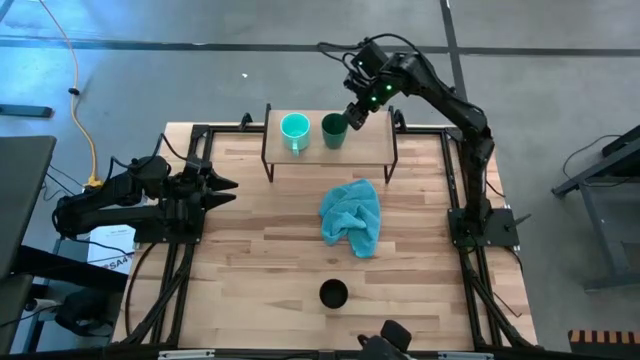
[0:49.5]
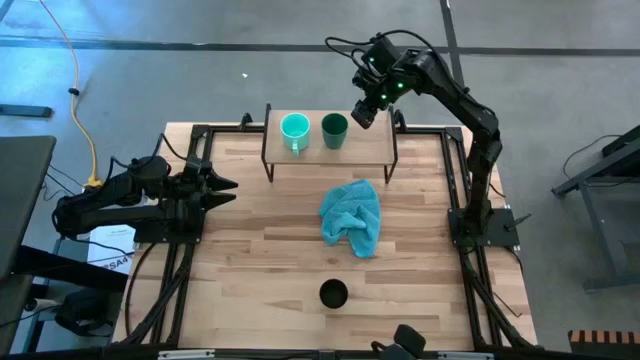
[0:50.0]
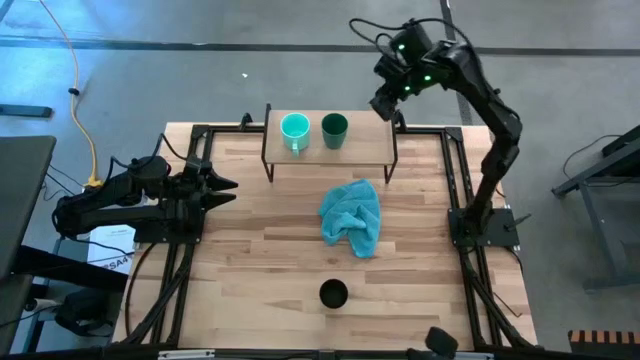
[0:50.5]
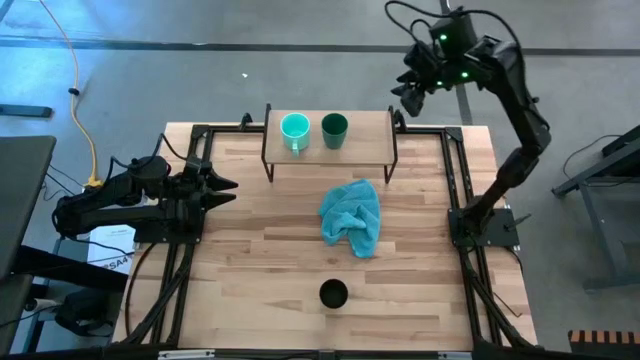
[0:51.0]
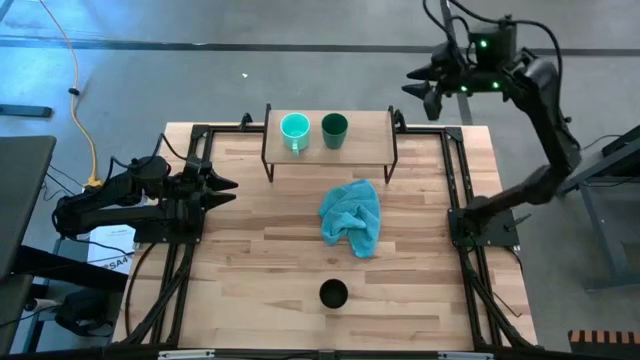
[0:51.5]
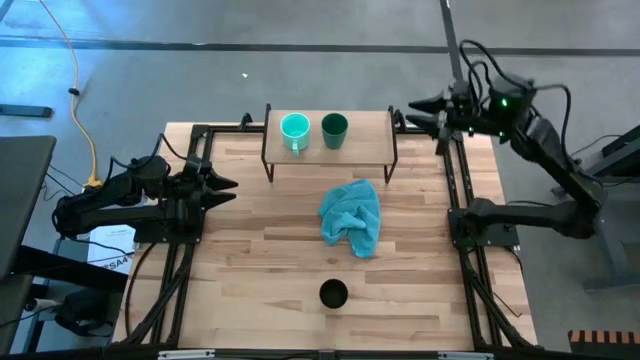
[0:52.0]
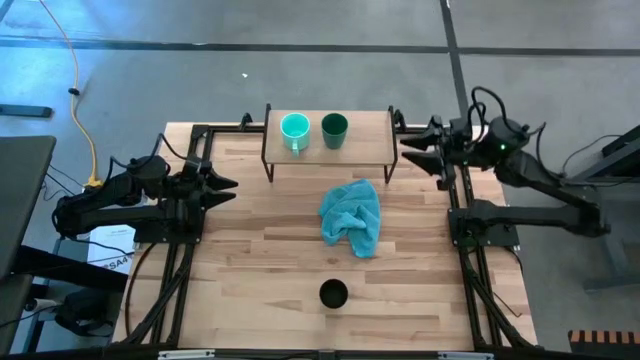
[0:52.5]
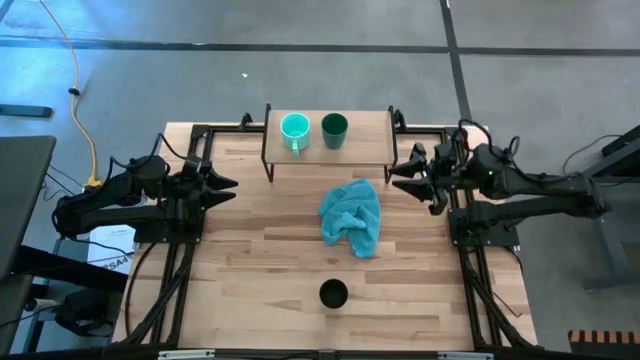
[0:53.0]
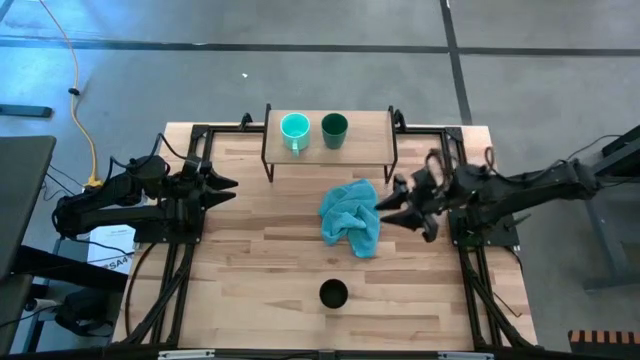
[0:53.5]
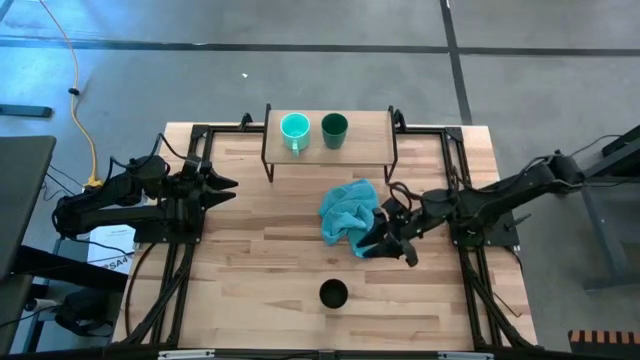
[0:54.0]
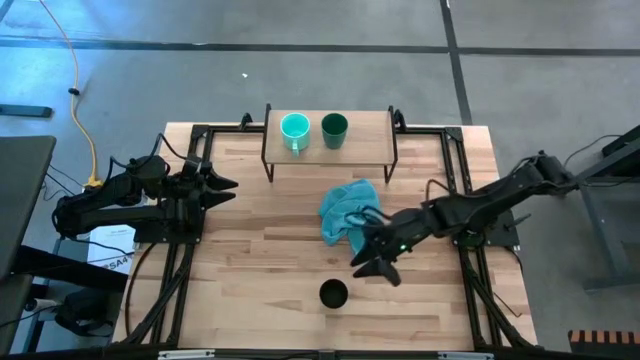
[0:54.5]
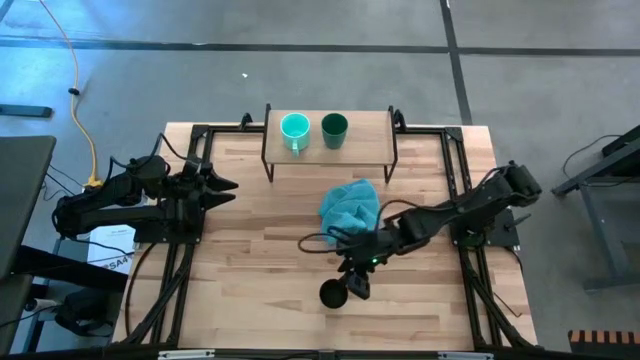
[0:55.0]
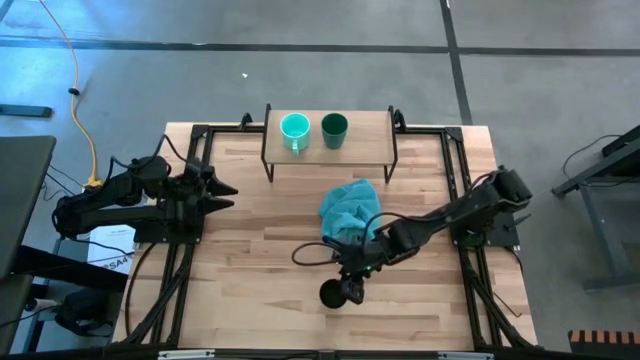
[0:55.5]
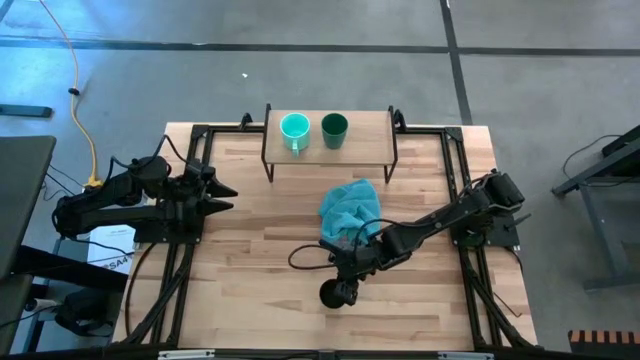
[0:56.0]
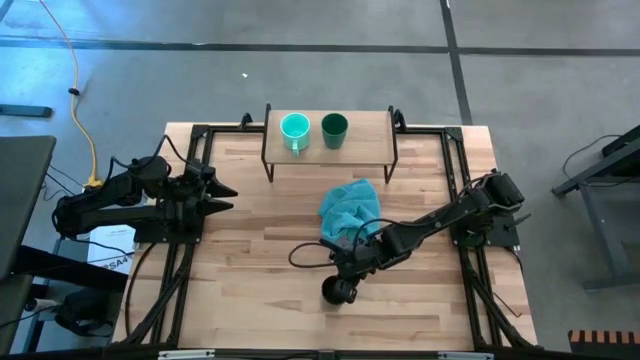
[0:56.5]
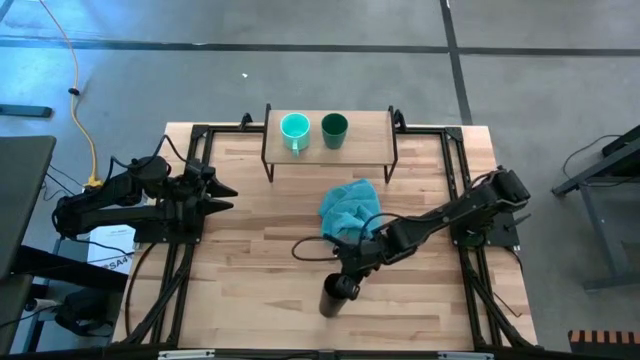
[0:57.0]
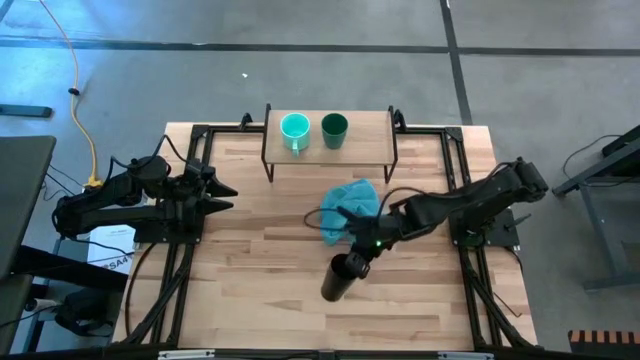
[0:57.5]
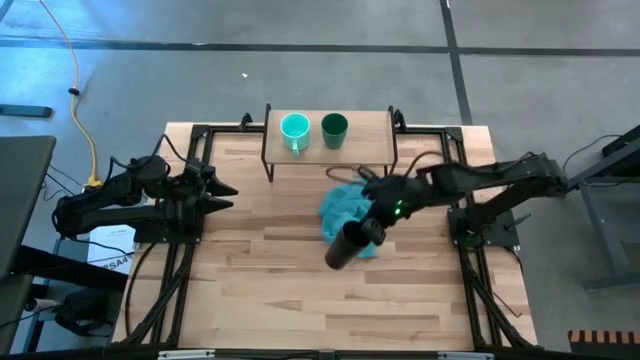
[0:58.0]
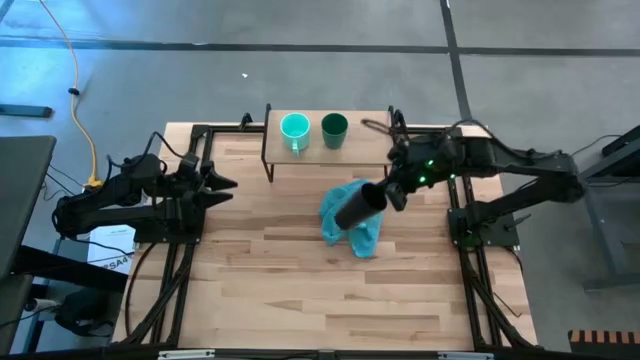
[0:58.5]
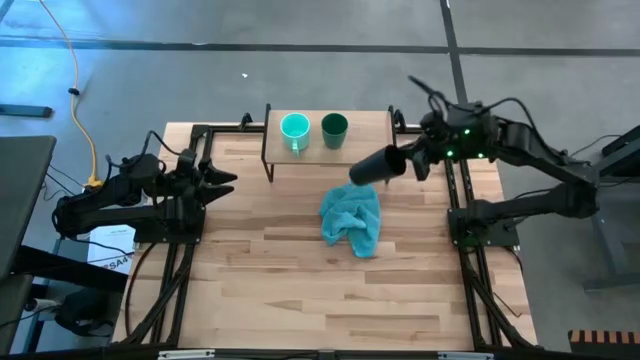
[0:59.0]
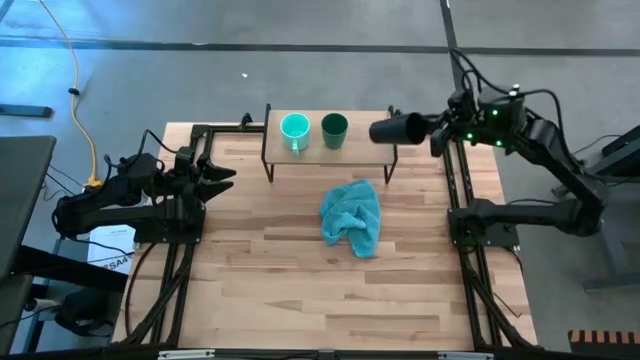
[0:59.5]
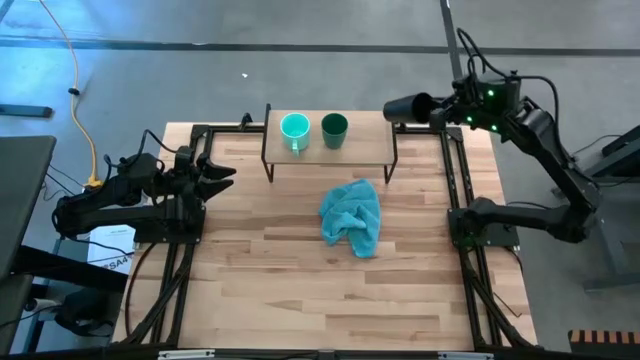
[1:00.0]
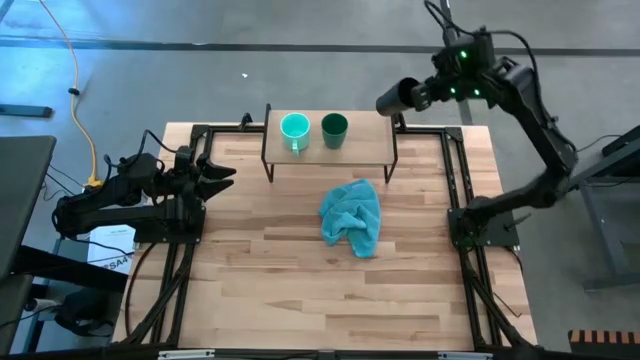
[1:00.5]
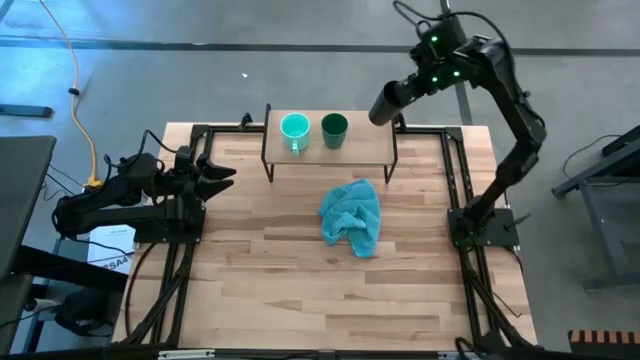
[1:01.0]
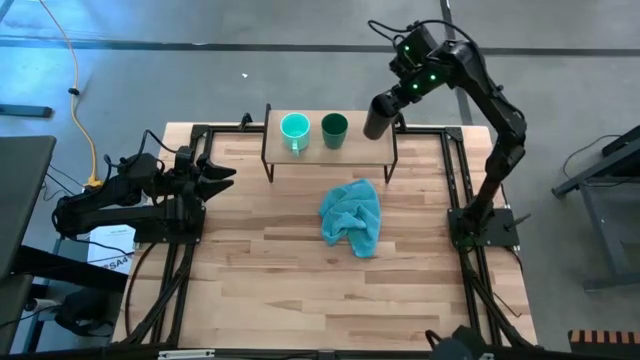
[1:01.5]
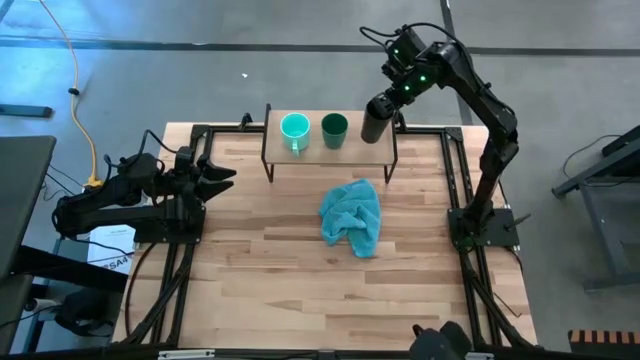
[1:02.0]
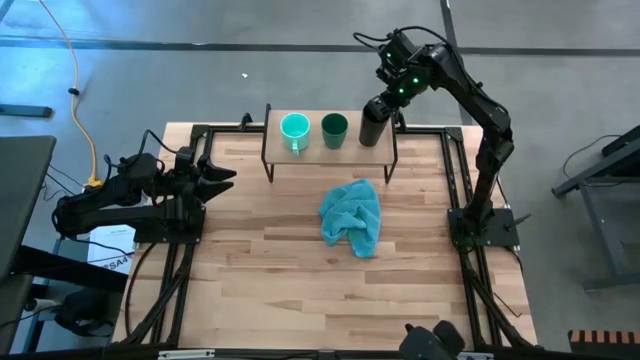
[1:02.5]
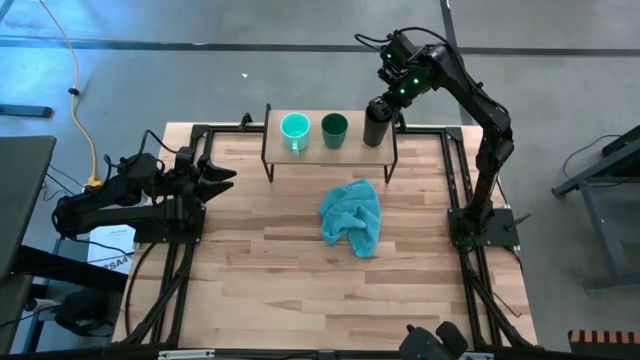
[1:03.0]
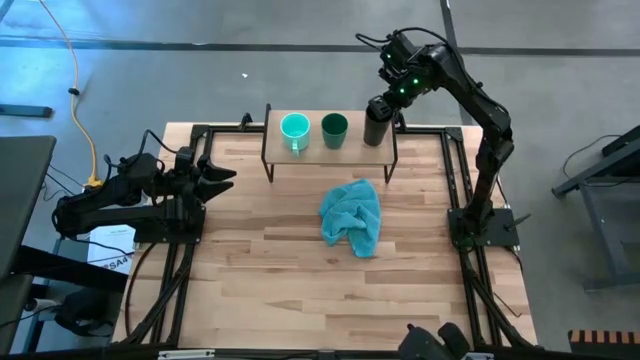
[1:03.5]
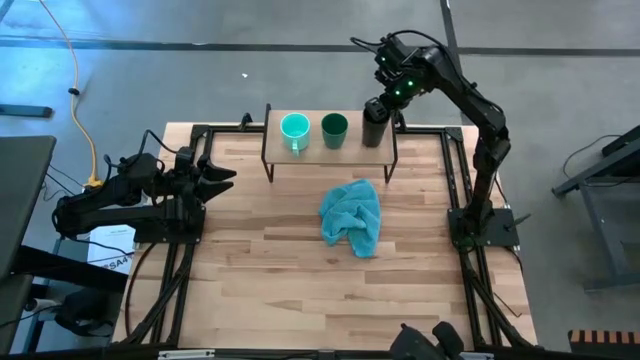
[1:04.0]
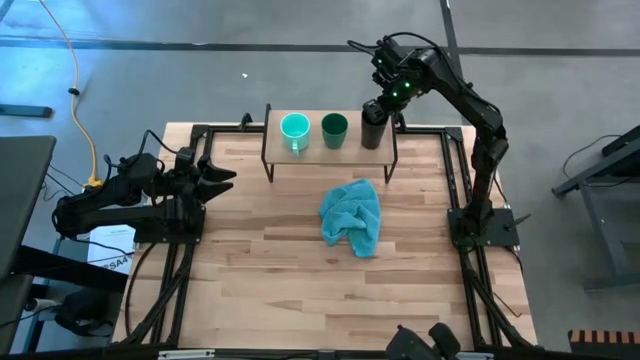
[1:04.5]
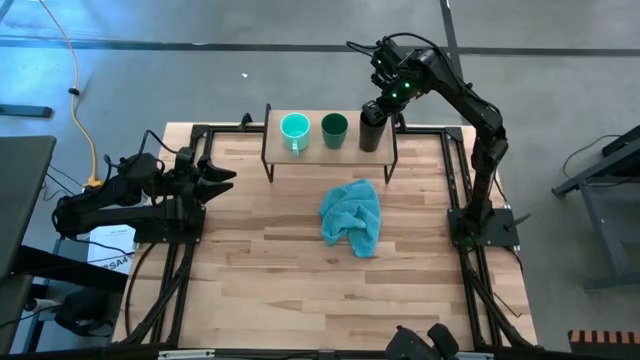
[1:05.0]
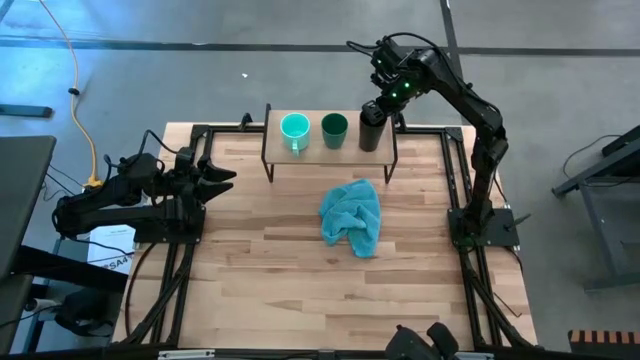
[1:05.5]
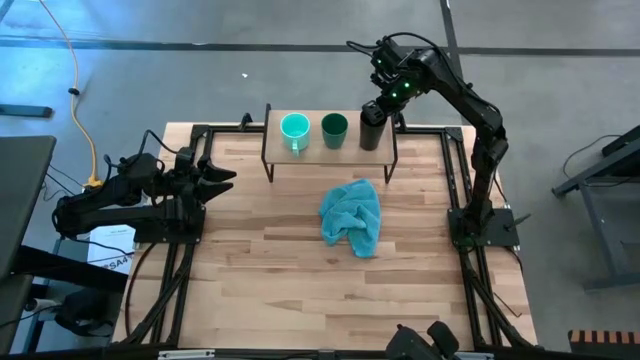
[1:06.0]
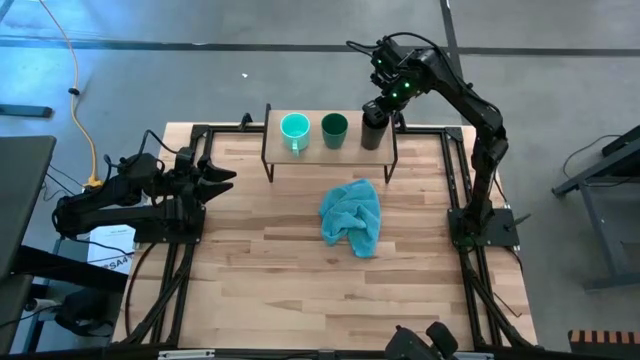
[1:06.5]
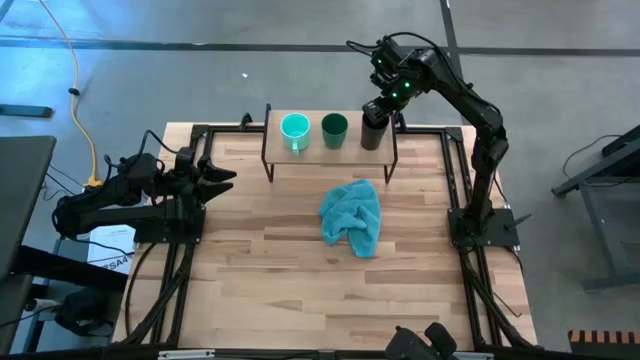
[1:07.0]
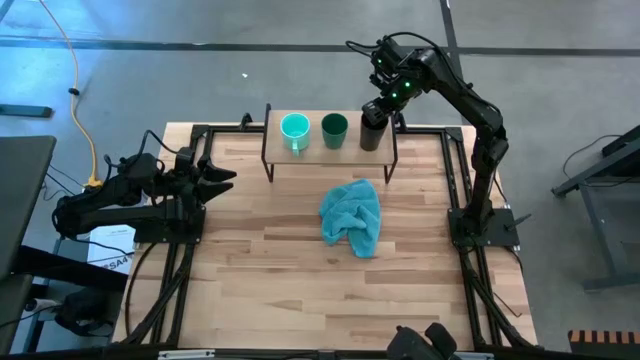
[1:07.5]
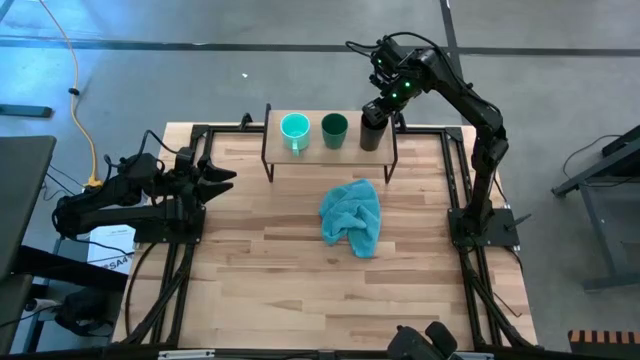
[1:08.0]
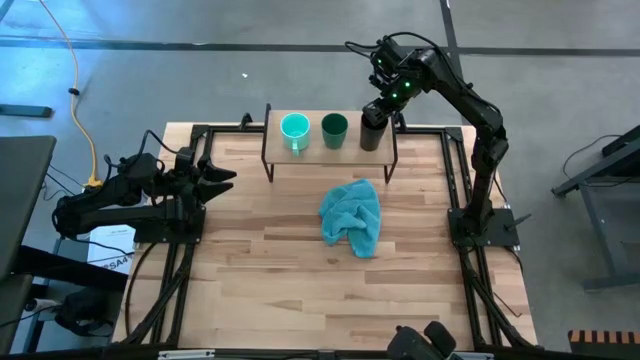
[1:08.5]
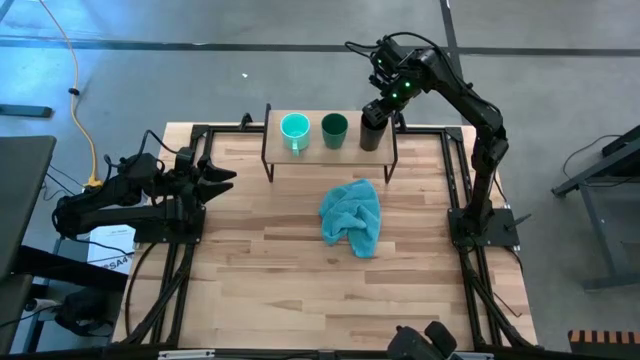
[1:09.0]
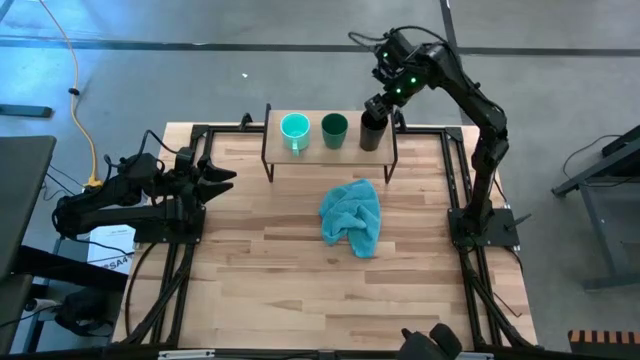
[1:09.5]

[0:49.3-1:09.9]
Task: Stack small to large cups/mugs on shelf
Put the black cup on the shelf
